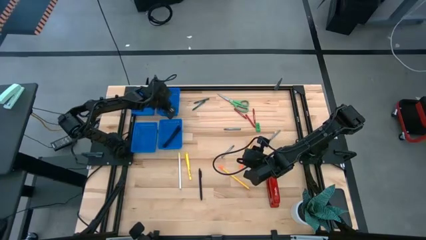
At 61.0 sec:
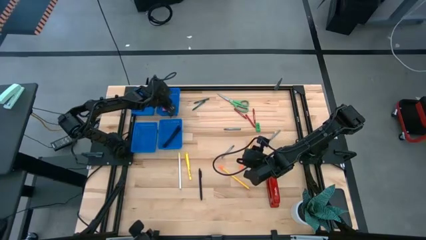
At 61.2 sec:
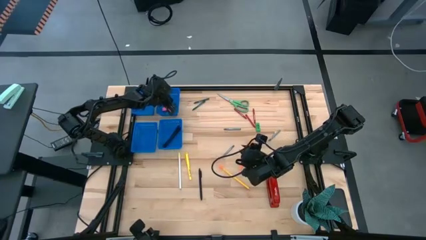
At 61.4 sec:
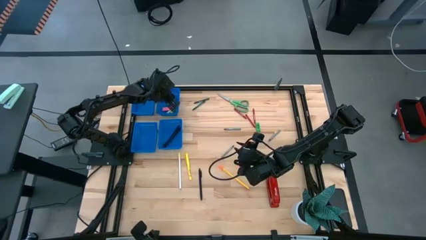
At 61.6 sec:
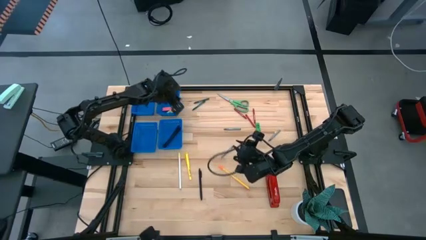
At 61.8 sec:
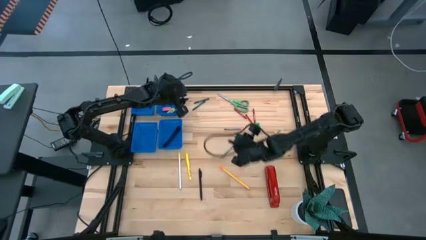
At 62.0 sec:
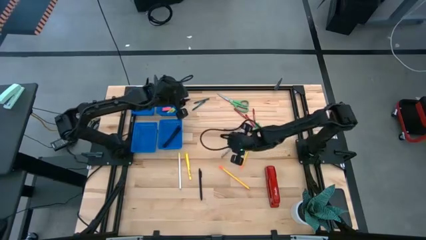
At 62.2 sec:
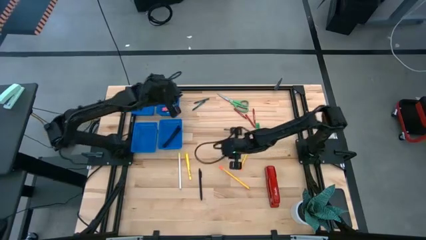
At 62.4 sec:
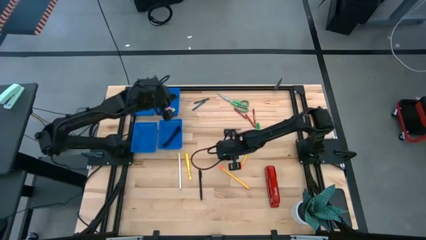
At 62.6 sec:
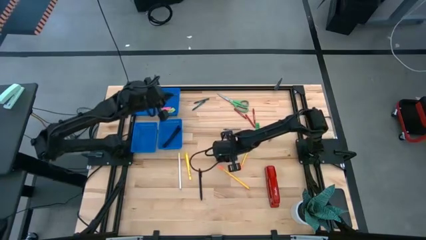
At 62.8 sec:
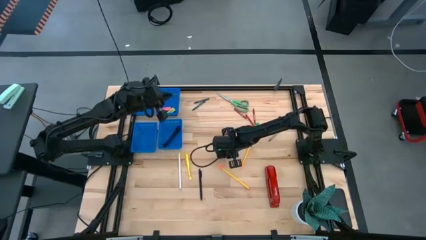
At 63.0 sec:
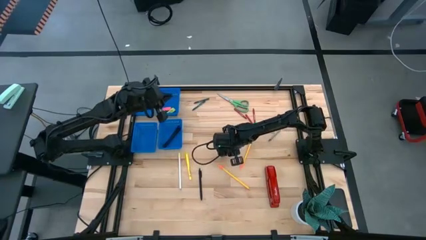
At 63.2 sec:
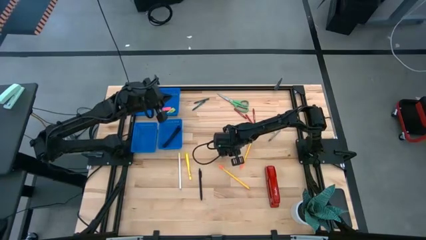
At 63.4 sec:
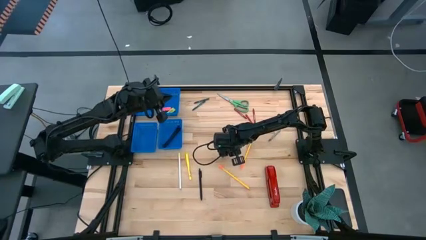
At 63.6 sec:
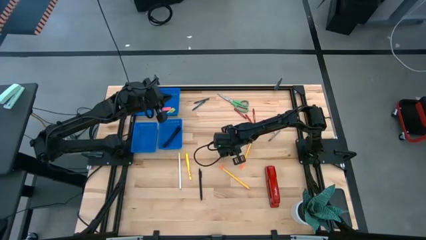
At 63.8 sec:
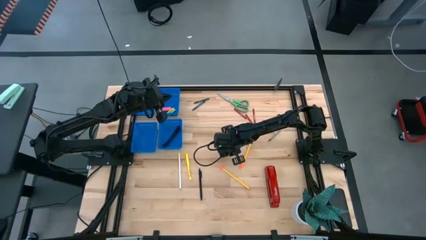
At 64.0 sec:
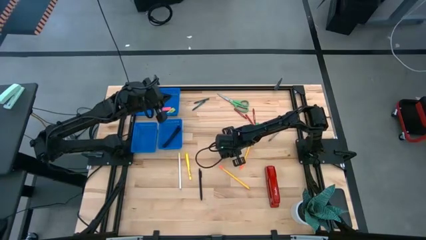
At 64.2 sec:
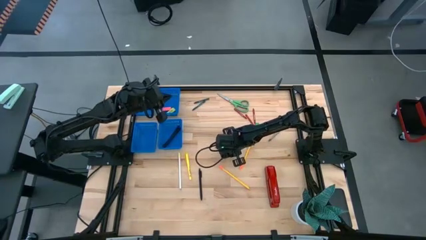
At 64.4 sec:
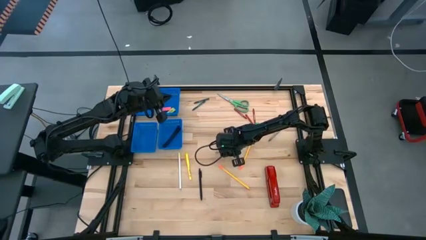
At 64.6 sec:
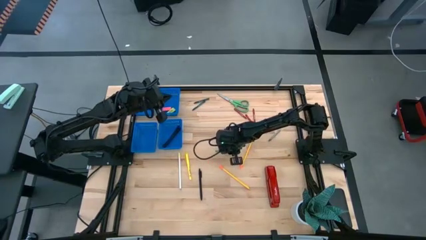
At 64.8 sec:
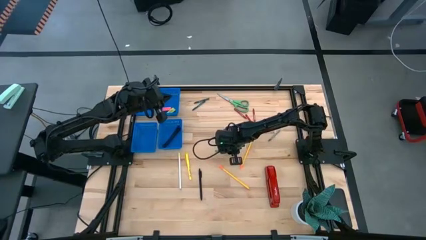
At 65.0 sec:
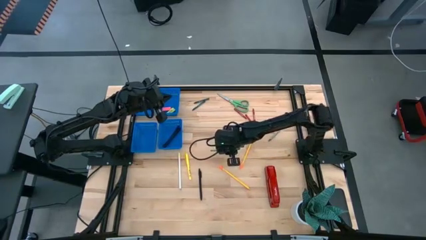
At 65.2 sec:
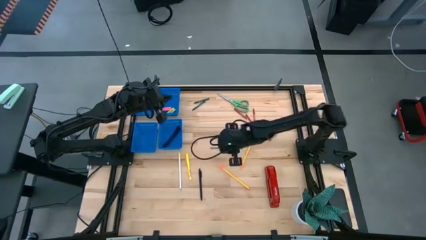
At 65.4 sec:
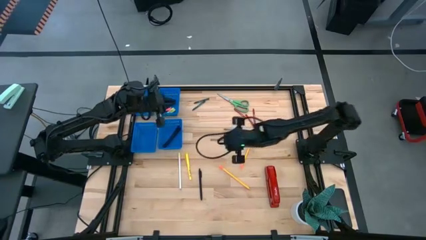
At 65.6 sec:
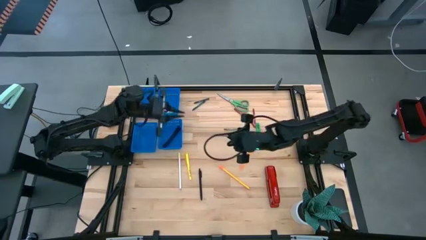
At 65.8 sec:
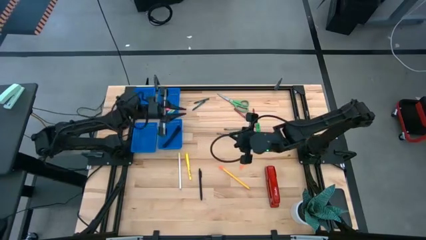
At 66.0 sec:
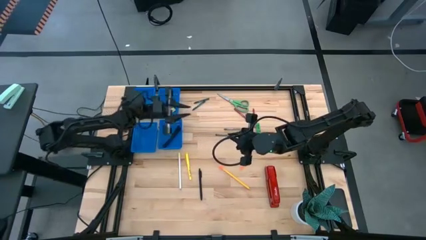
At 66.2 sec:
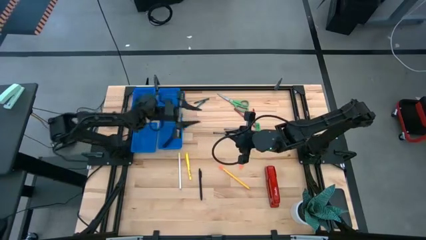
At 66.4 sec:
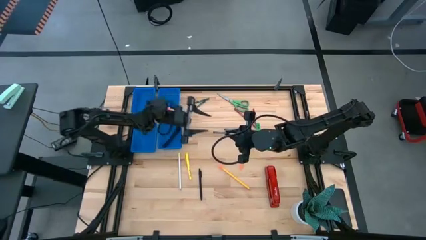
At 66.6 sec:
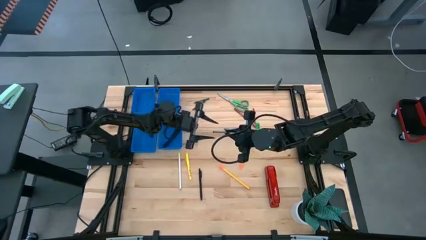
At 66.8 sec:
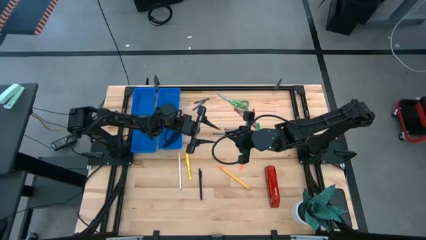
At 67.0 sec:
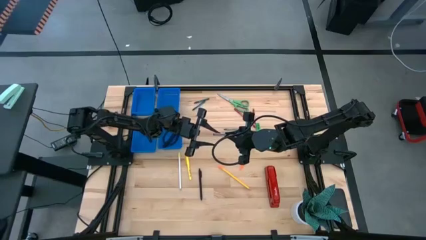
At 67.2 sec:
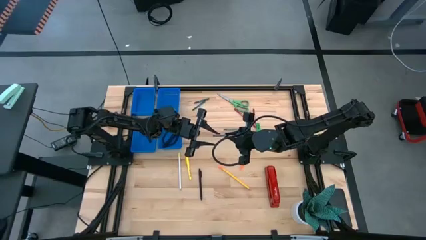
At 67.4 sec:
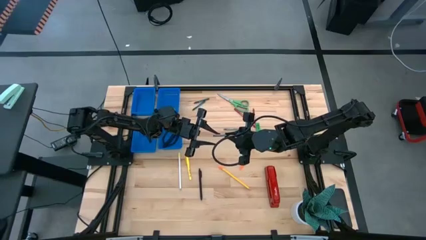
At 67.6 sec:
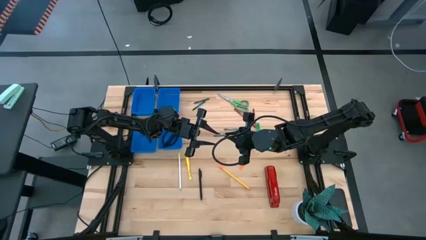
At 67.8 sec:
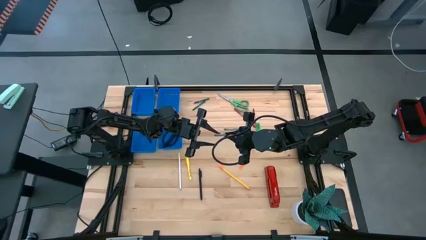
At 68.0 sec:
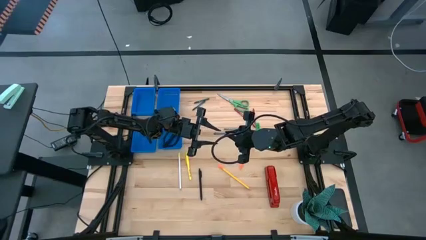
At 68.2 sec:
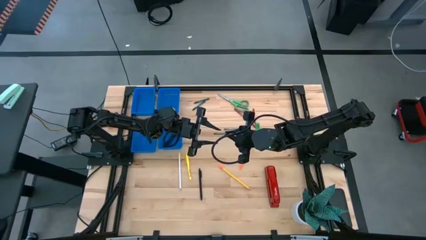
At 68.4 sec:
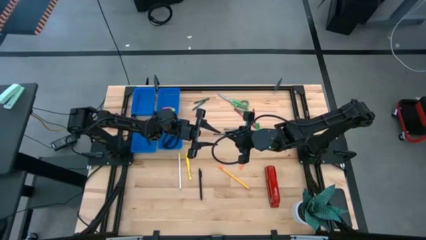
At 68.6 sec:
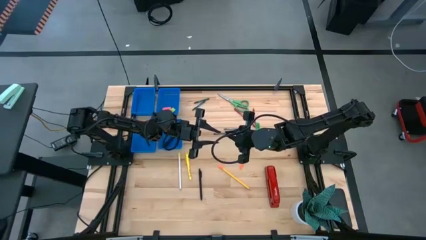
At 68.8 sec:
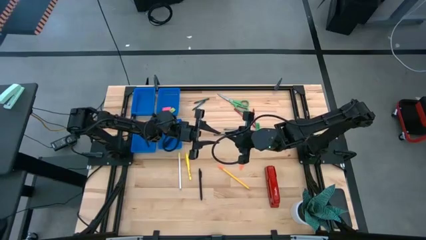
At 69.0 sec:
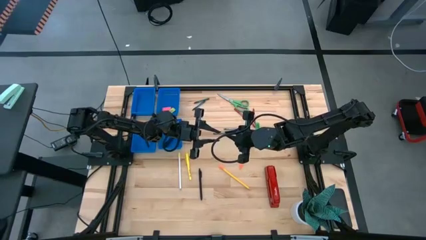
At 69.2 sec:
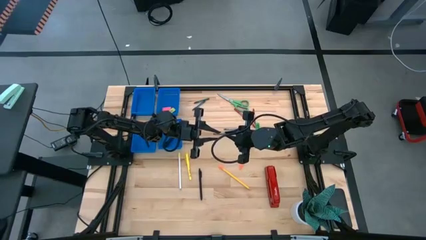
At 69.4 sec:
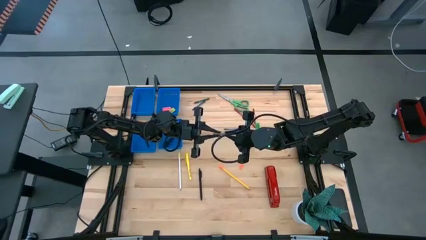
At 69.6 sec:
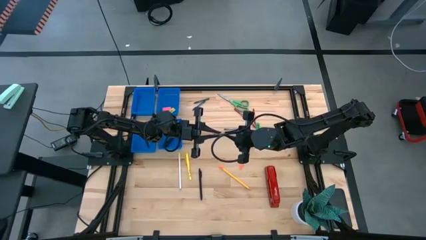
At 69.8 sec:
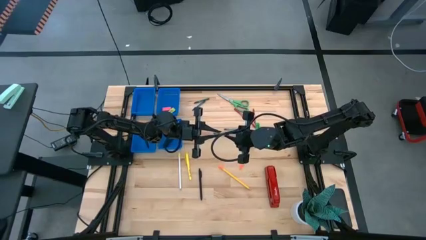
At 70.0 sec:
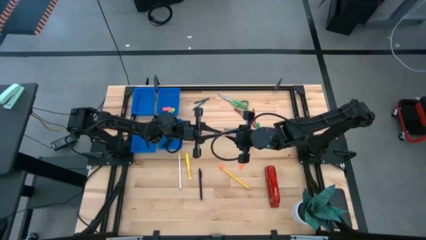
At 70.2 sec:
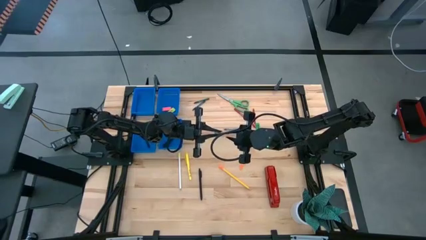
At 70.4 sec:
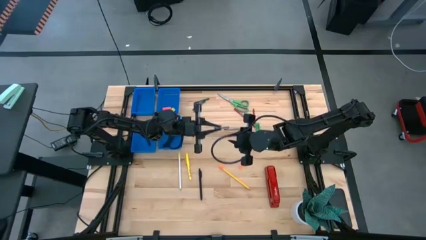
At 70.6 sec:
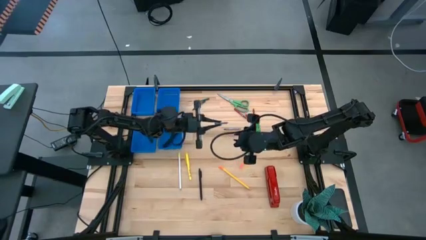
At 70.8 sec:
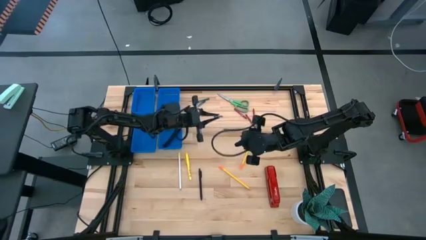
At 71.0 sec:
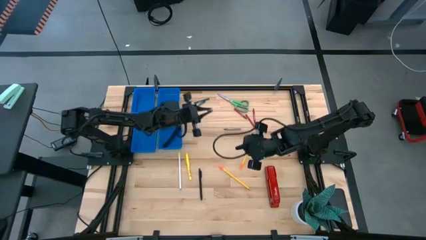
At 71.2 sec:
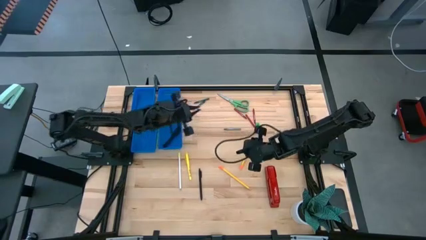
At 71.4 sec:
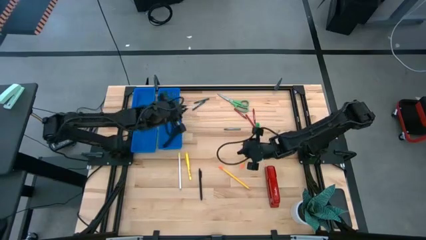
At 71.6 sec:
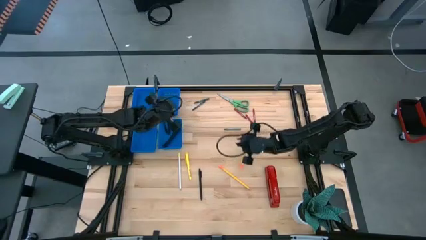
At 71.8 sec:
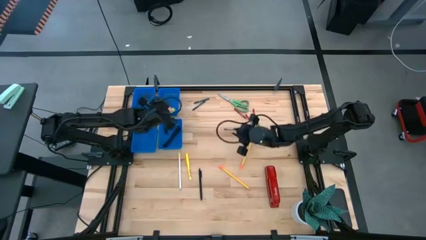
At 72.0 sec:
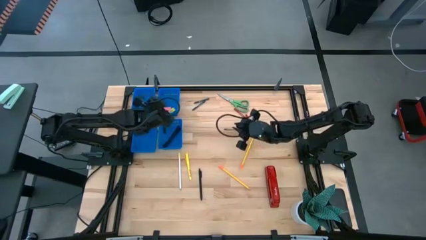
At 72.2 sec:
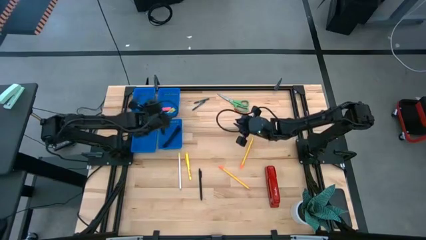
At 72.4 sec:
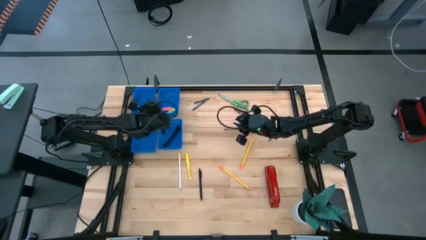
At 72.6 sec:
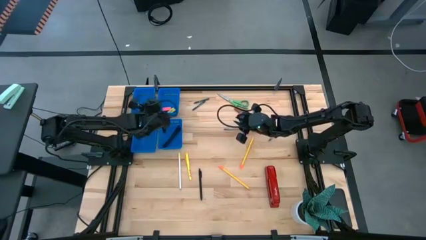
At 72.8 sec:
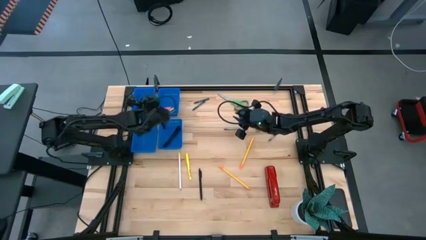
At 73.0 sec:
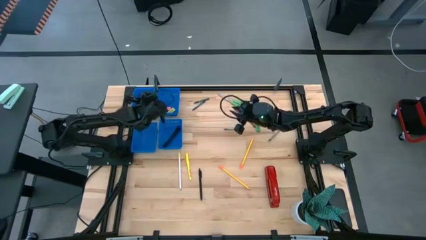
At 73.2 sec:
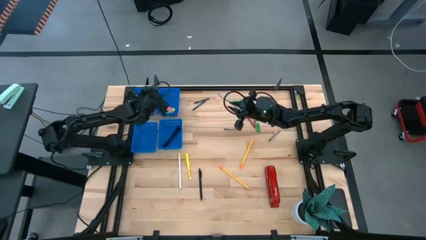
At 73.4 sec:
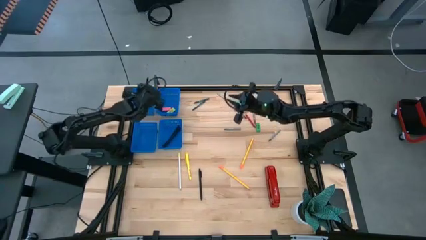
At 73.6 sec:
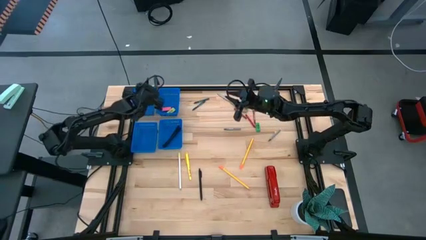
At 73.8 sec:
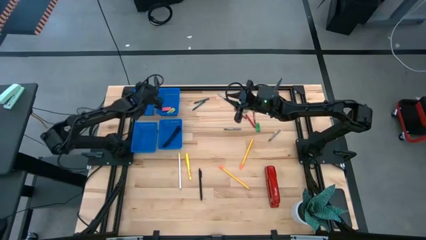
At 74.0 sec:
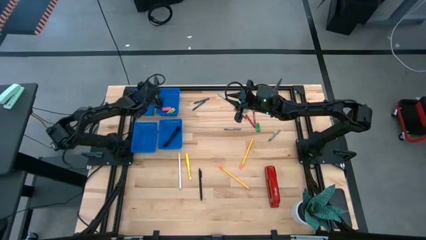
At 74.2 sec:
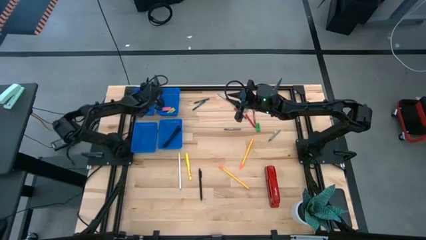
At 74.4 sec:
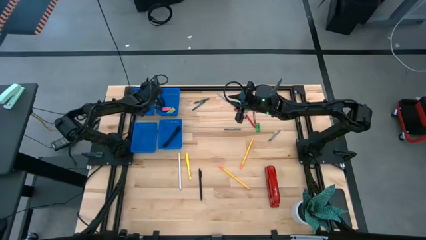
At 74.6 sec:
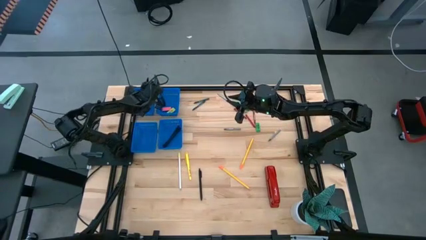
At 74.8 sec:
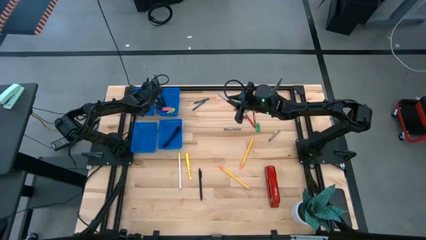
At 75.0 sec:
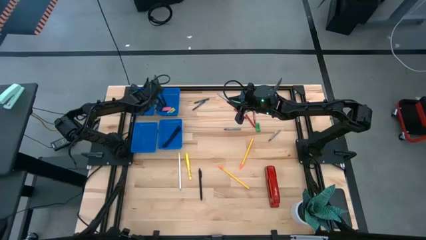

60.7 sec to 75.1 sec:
Task: Sort crayons/erasers/pens/pencils in bins
Put the gray crayon into the top left blue bin

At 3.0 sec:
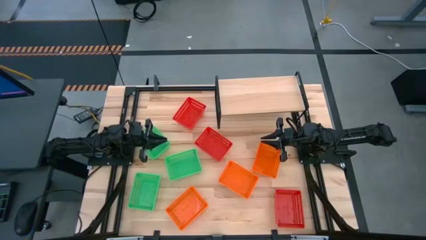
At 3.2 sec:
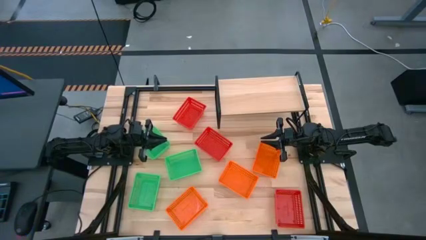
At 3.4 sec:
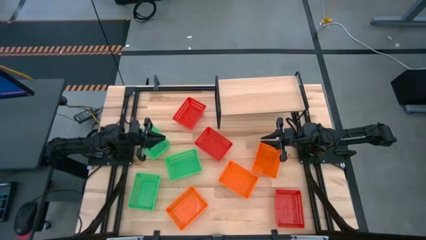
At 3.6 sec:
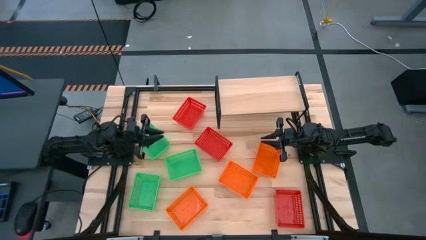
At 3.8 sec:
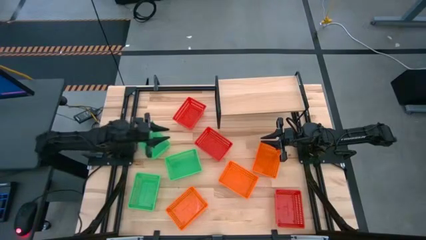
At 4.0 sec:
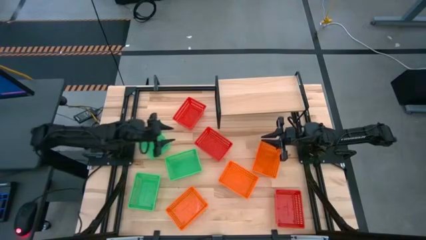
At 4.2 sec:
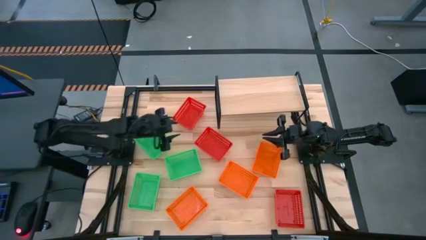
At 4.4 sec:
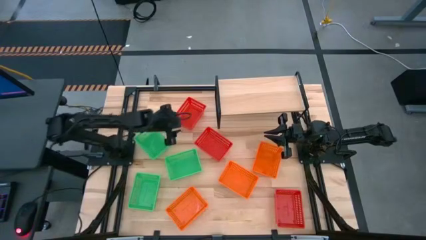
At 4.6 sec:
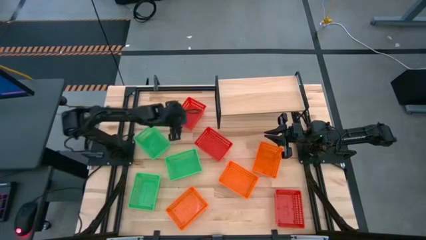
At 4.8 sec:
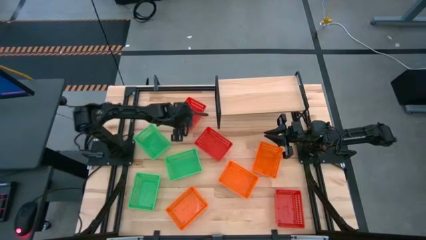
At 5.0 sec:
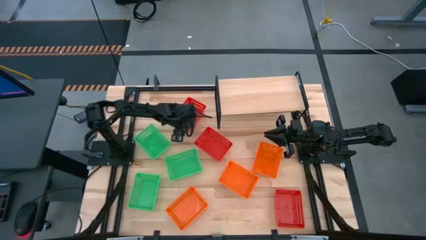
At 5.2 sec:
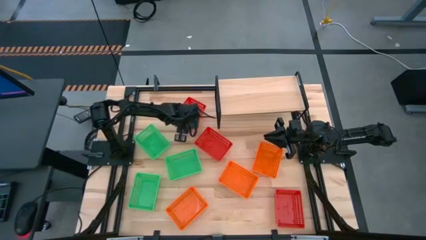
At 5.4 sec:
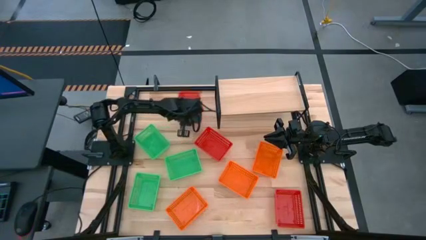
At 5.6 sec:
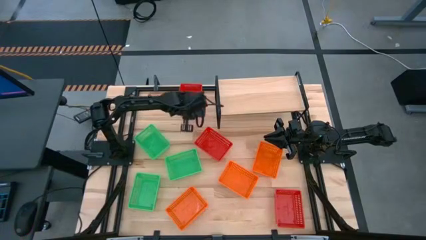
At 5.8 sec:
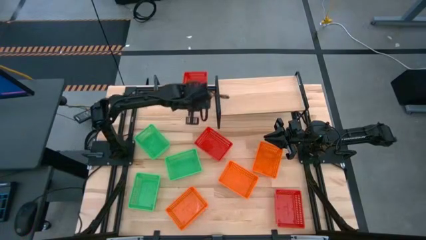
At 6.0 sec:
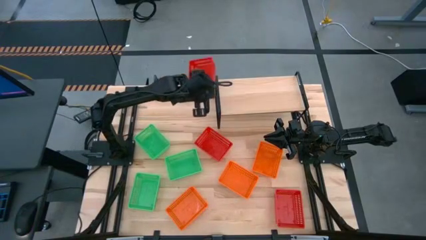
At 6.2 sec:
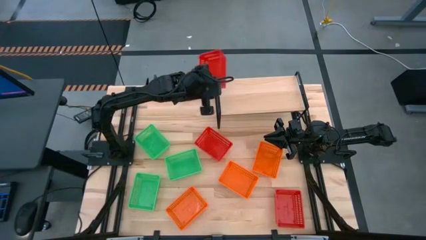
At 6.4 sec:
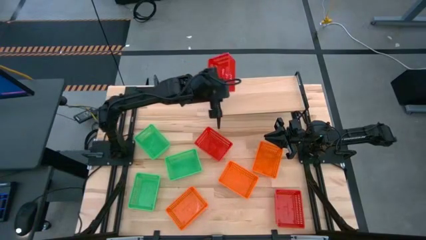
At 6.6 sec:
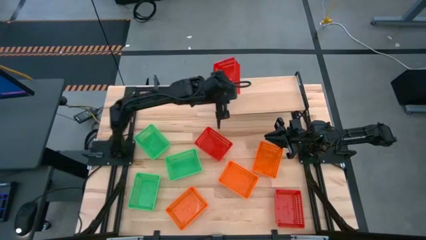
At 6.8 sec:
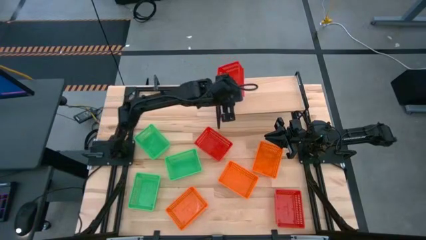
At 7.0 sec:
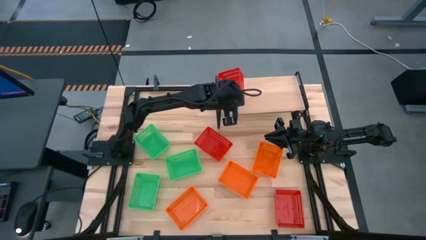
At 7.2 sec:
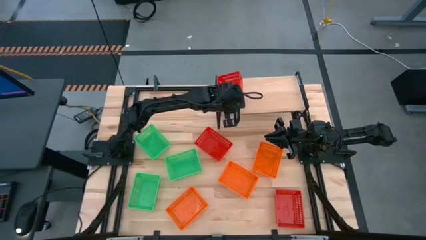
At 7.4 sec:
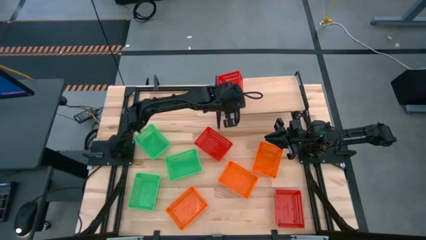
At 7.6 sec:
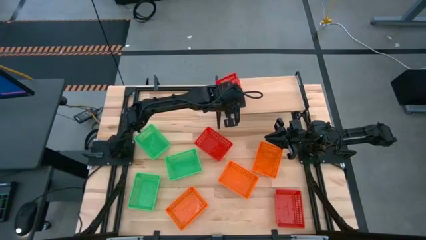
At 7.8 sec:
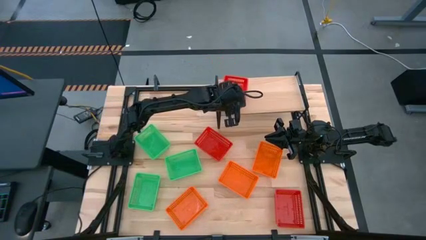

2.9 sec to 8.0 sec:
Task: Stack baskets on shelf by color
Put the top red bin on the shelf
